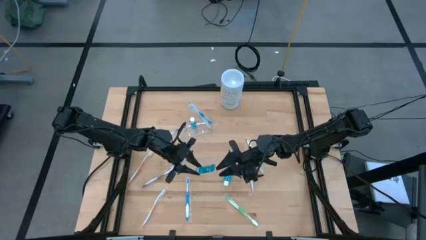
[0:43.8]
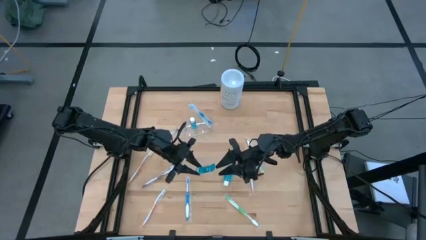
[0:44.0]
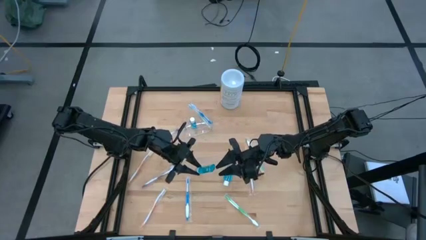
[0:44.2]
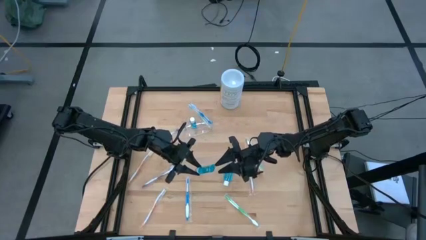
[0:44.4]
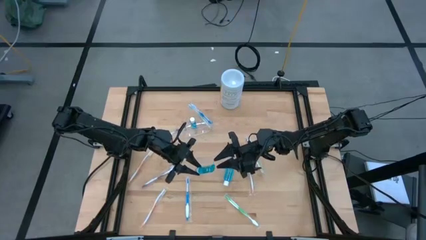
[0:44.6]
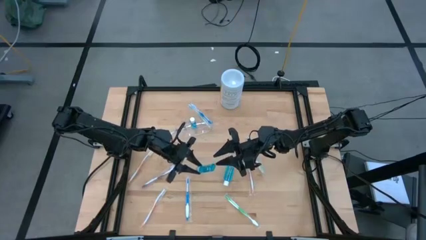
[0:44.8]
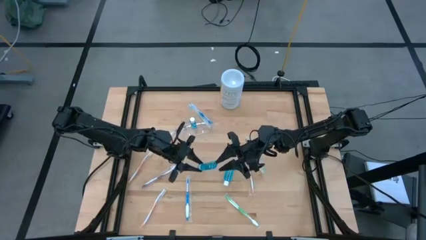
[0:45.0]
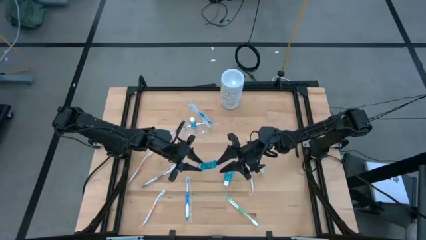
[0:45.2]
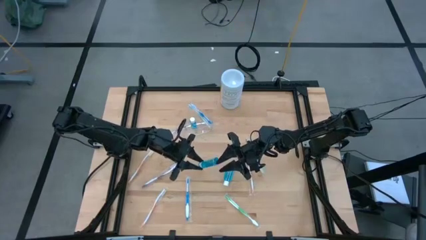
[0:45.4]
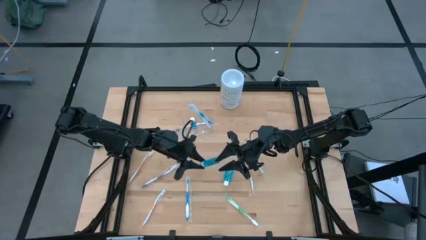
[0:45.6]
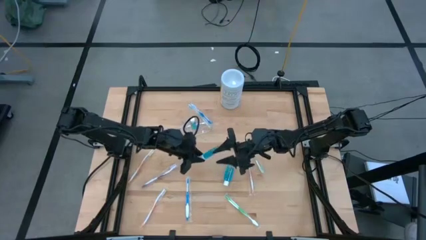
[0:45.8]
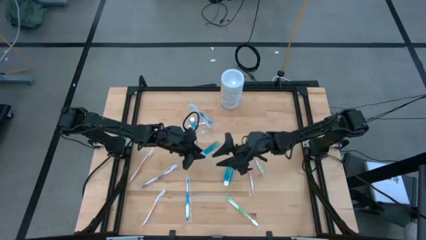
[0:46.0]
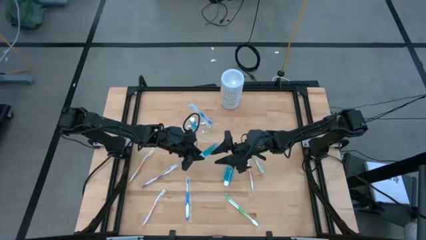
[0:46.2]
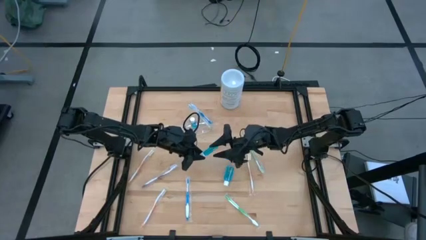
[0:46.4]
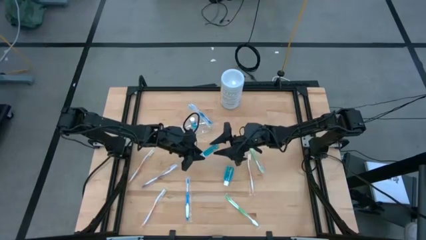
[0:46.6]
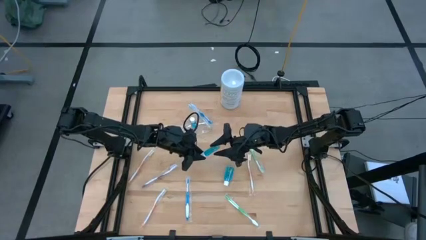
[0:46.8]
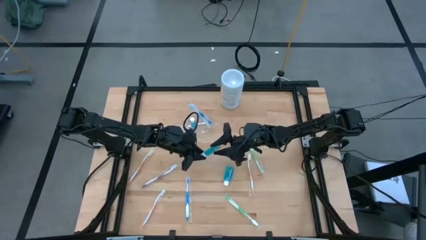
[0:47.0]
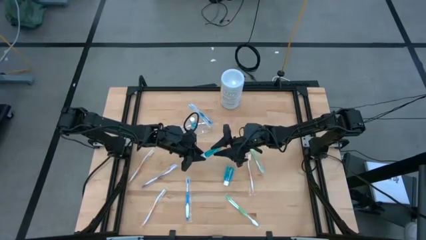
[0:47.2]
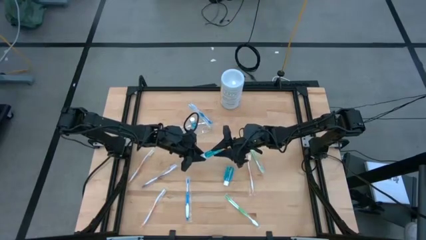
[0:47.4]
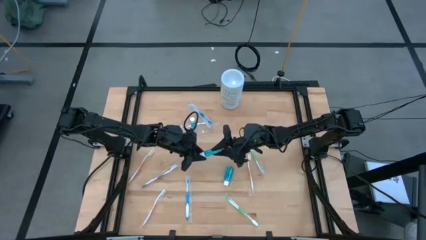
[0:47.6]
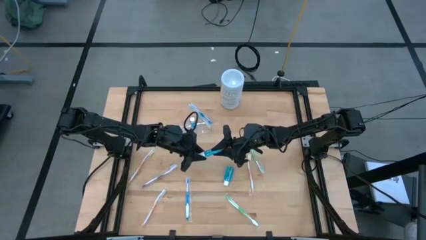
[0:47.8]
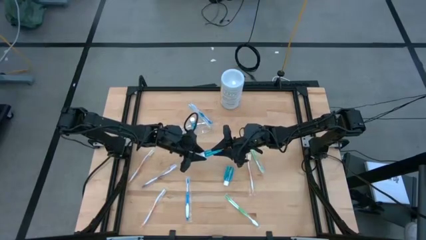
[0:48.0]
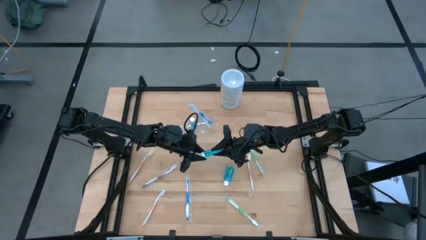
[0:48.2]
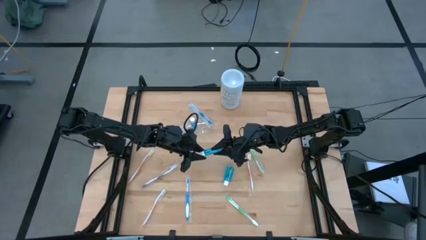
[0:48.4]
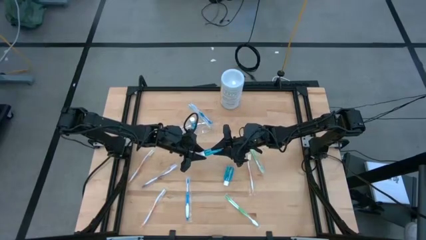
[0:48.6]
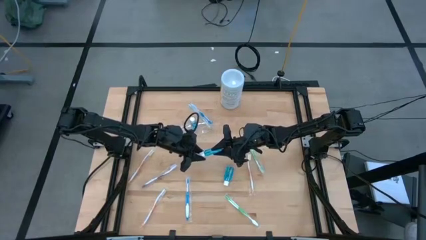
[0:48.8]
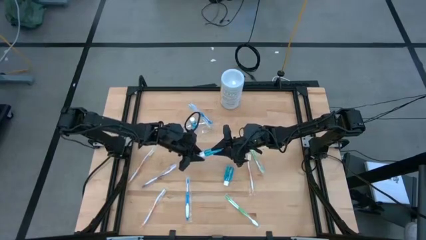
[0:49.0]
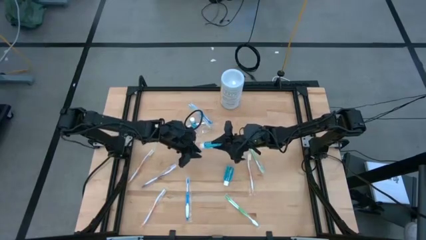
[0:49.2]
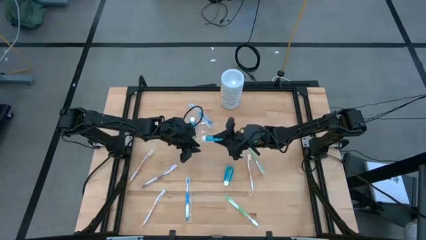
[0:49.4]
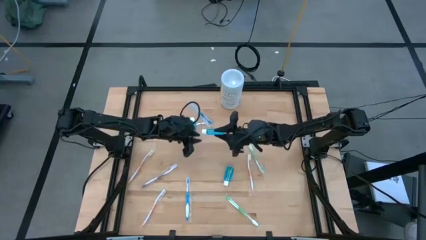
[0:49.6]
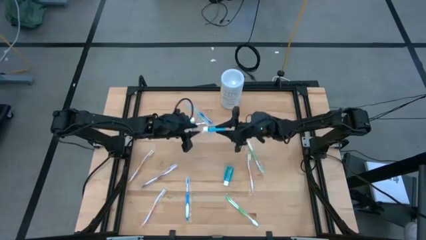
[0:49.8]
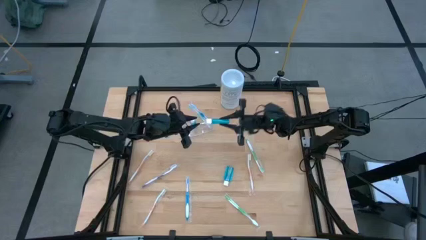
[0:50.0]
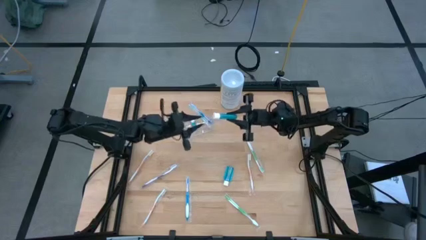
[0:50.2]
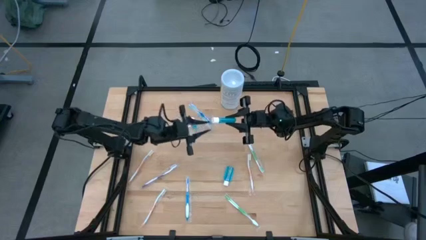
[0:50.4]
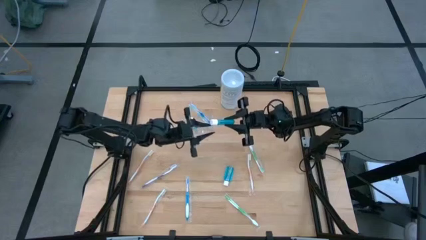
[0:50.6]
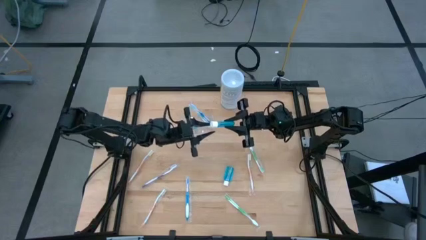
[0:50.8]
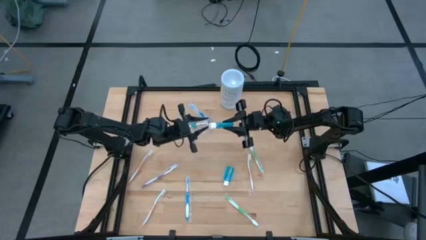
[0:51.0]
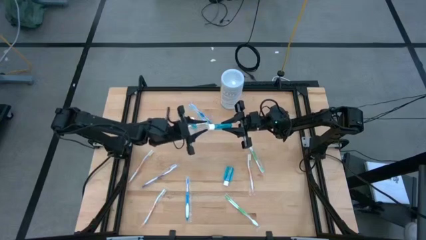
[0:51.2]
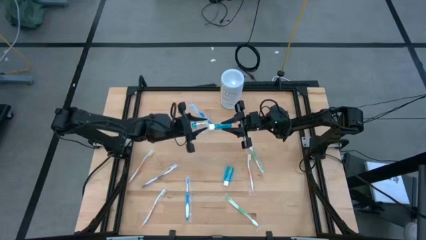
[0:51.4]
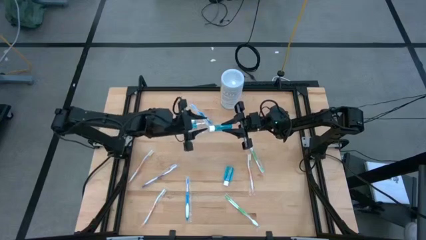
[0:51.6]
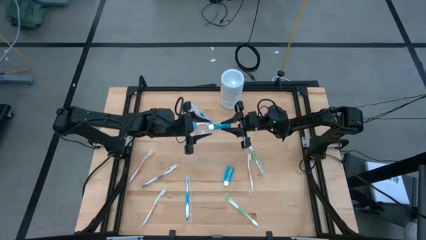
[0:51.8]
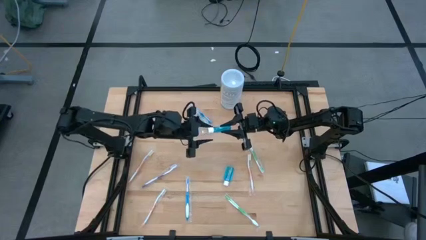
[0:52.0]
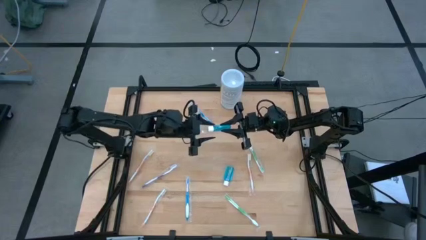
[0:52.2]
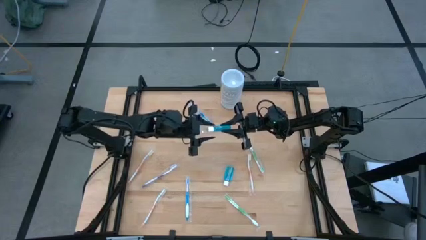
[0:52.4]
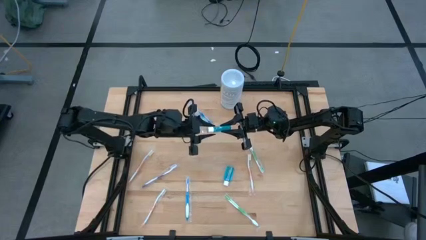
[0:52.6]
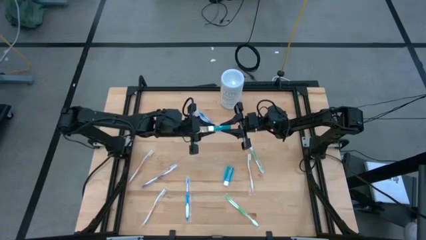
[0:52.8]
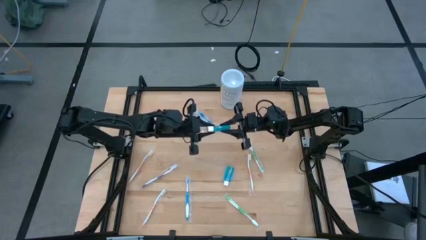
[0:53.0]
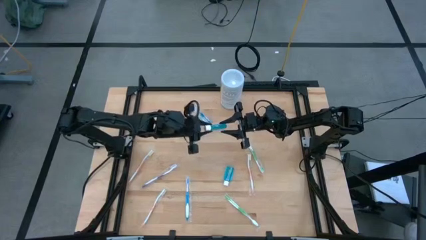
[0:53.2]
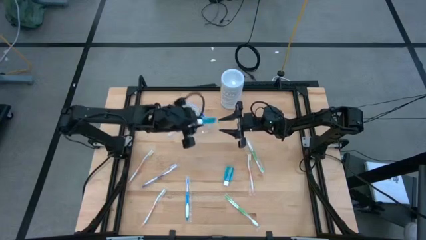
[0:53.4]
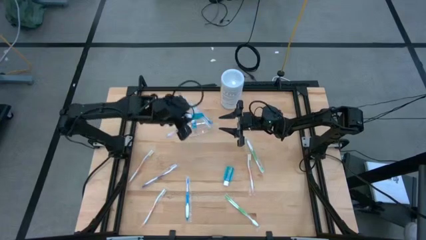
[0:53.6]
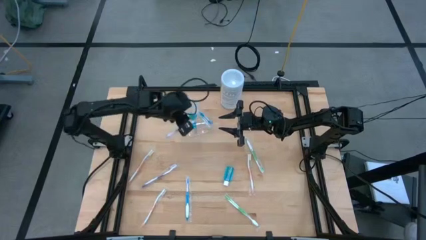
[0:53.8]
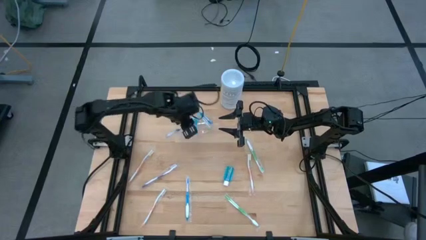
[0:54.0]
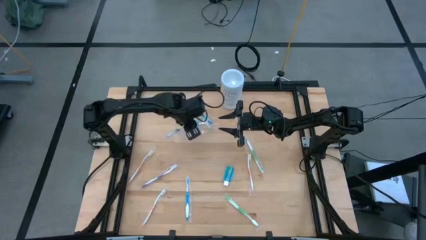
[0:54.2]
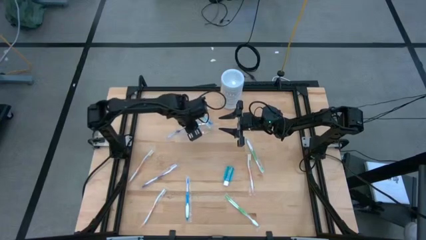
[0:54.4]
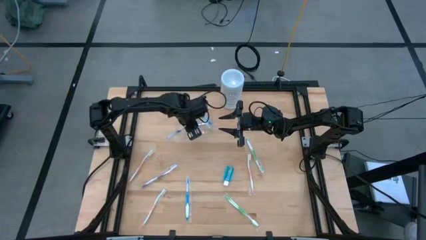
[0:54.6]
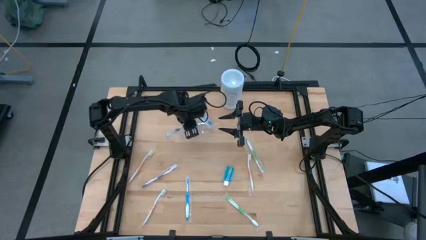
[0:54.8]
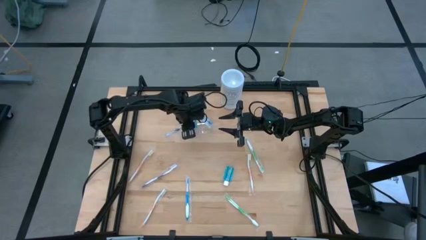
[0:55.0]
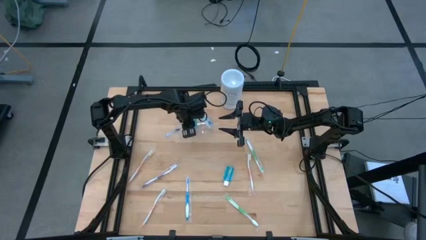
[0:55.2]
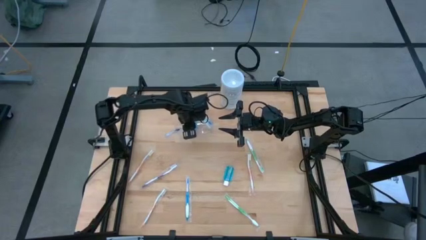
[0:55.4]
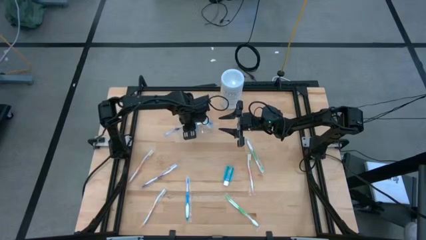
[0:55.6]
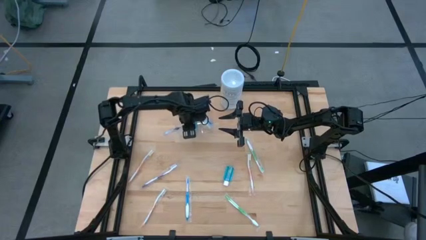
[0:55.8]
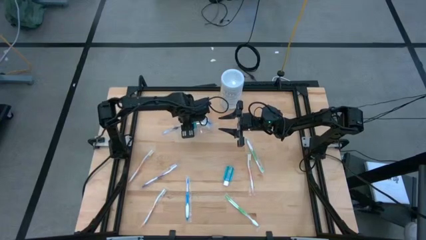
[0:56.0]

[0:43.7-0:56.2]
Task: Pick & Place toothbrushing station
Put the left blue mouthwash into the transparent organizer

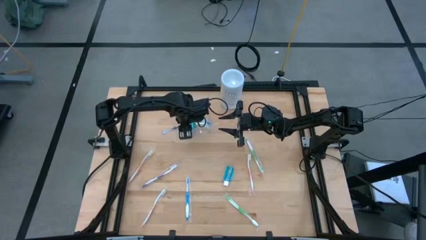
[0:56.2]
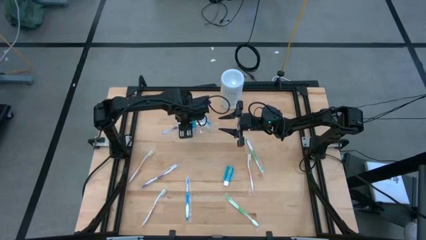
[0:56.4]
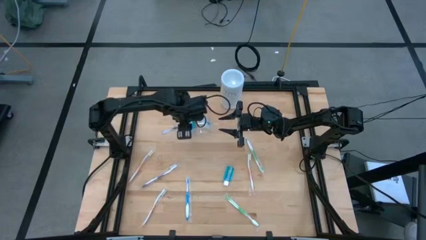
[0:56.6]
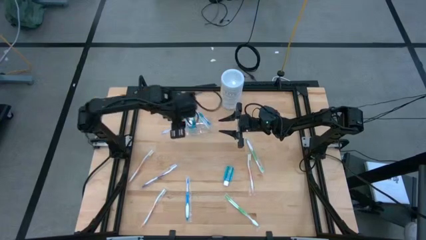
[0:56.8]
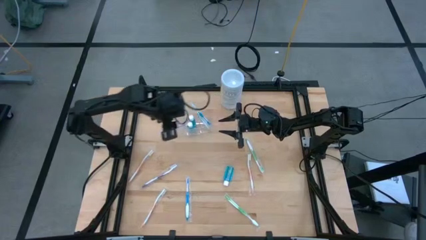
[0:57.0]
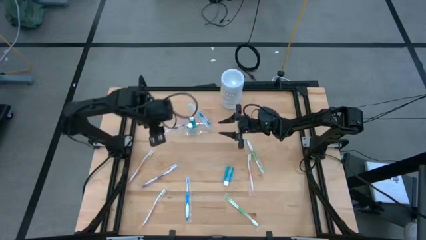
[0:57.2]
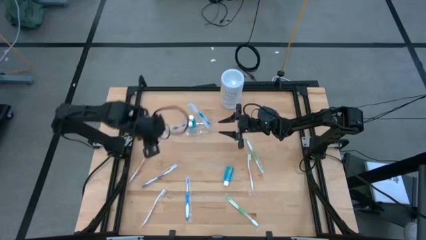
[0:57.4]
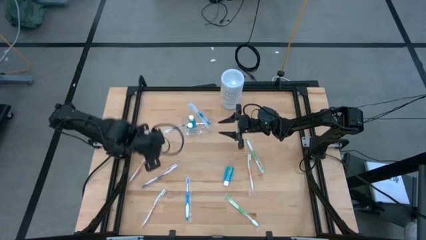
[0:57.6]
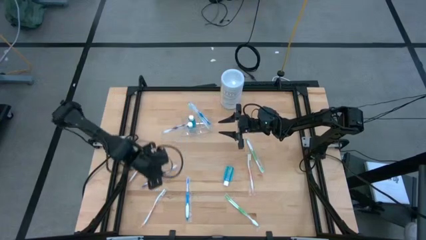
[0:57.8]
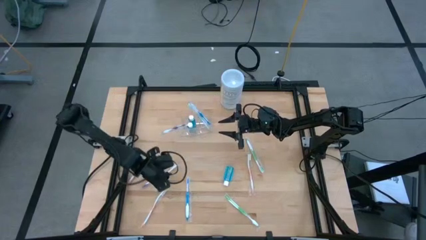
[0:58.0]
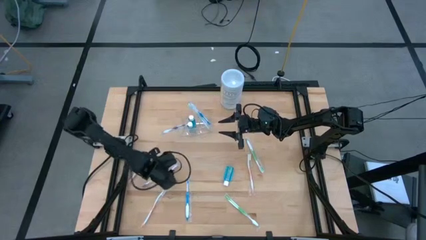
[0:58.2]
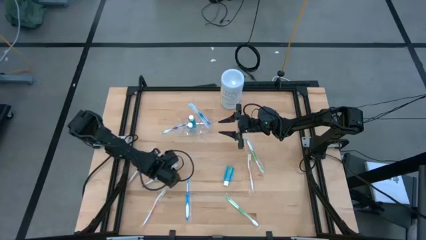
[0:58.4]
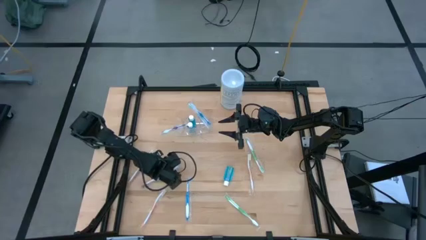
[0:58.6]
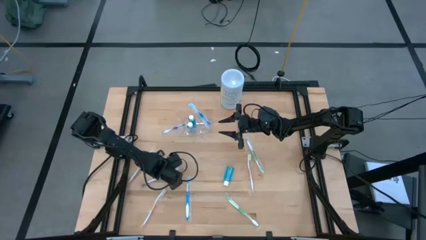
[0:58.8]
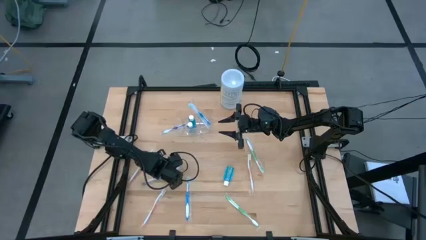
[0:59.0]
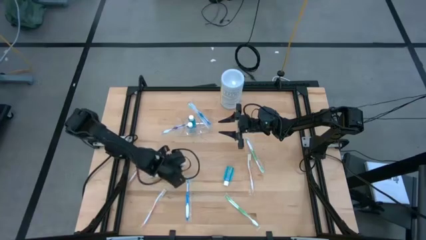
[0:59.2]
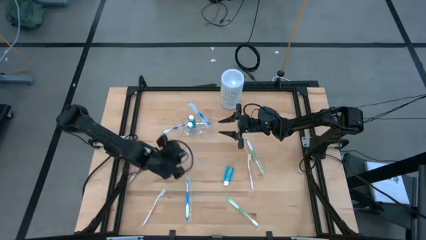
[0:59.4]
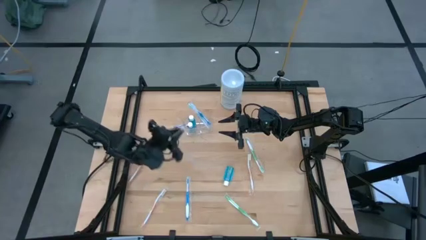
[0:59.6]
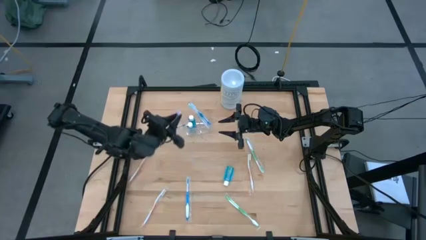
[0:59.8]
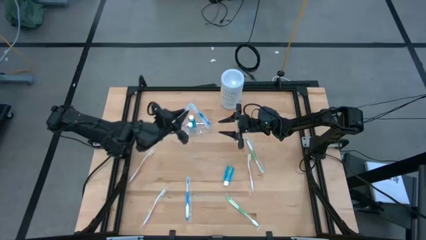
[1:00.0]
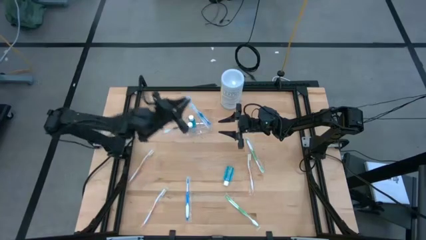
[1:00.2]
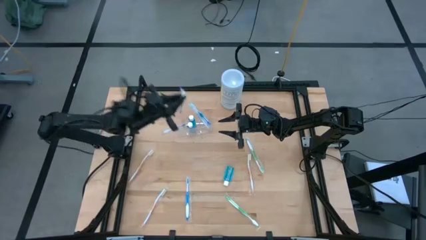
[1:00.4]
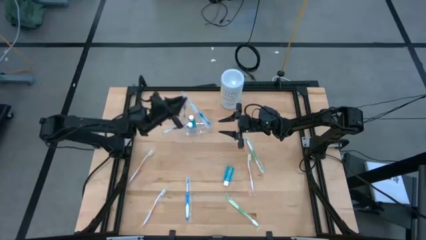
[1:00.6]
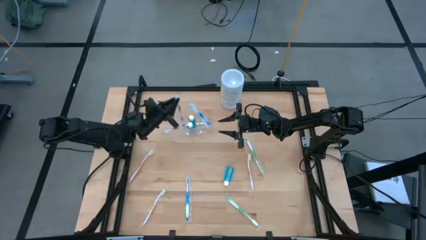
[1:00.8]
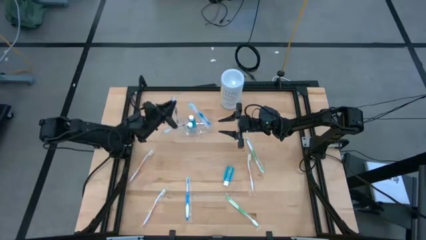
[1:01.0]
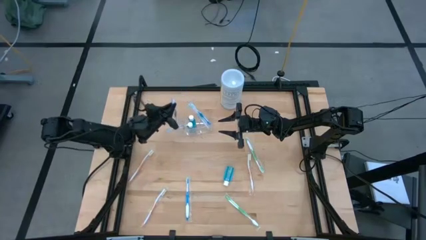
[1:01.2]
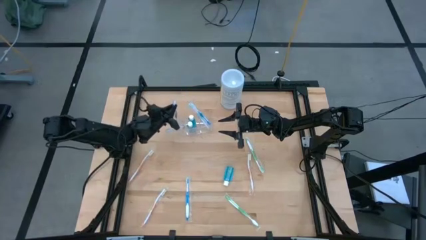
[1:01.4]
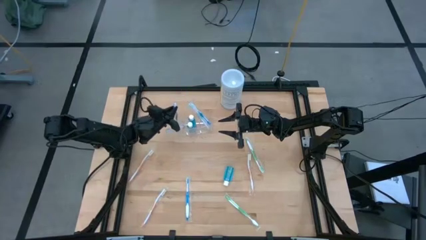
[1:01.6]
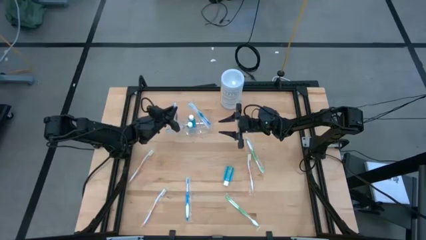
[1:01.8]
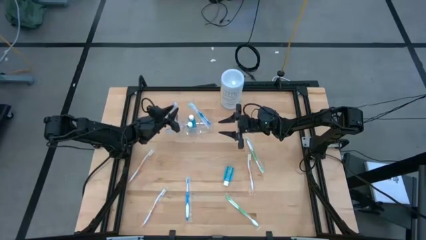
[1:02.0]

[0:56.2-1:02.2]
Put the purple toothbrush into the transparent organizer
